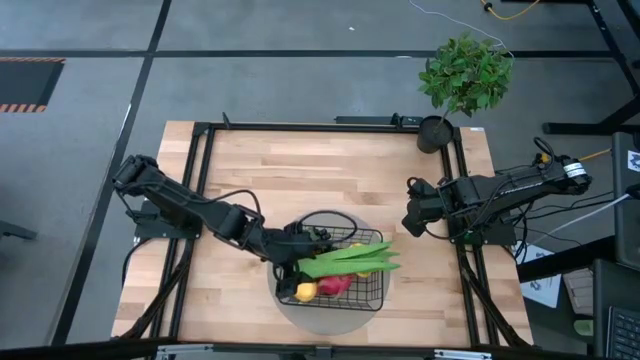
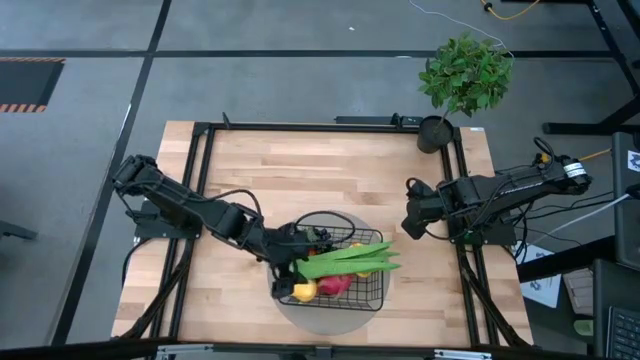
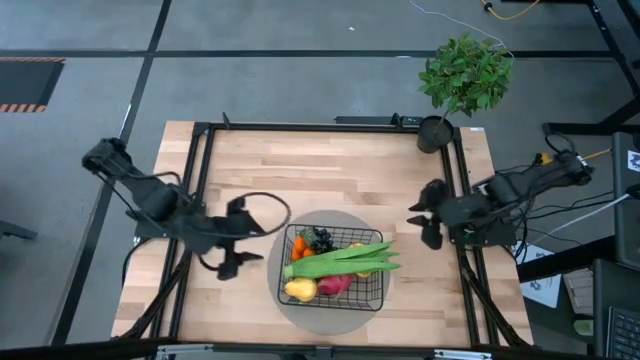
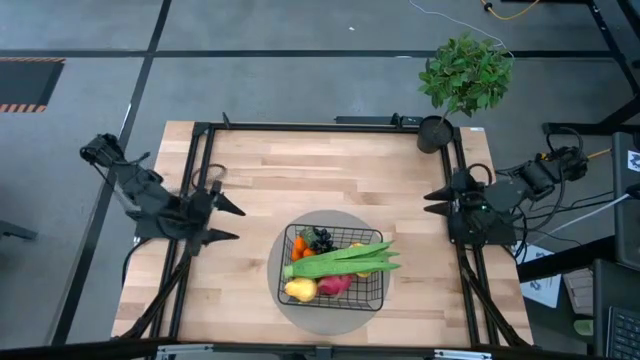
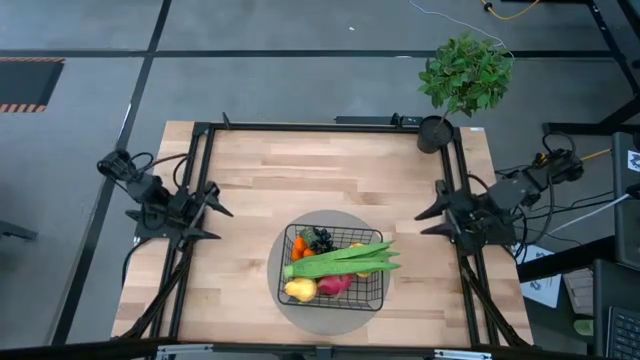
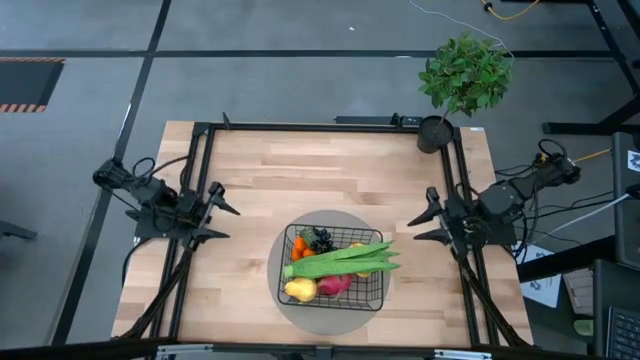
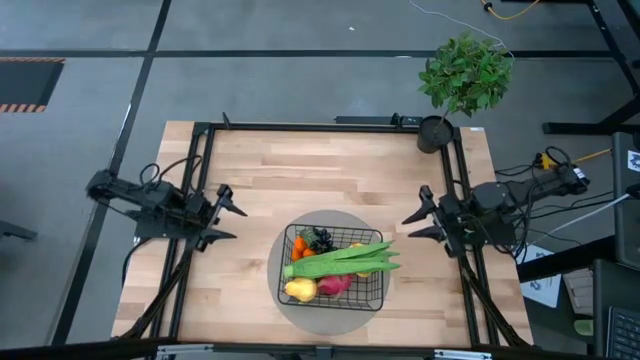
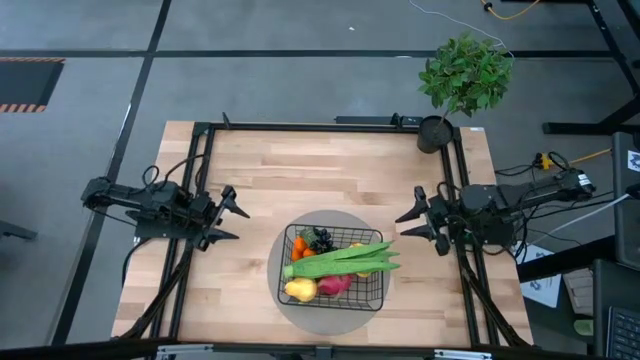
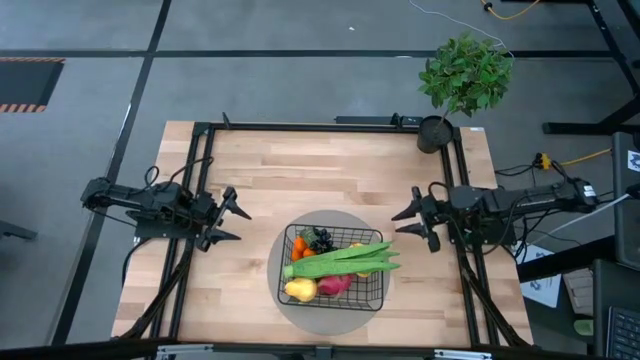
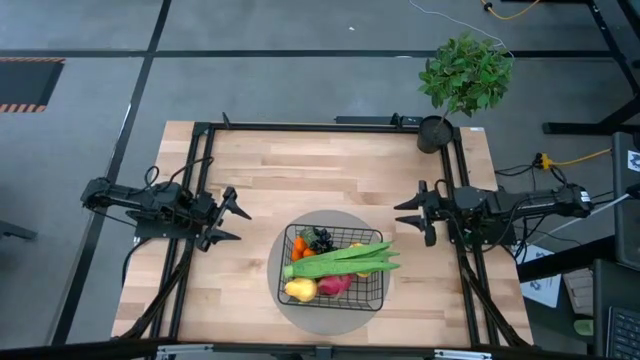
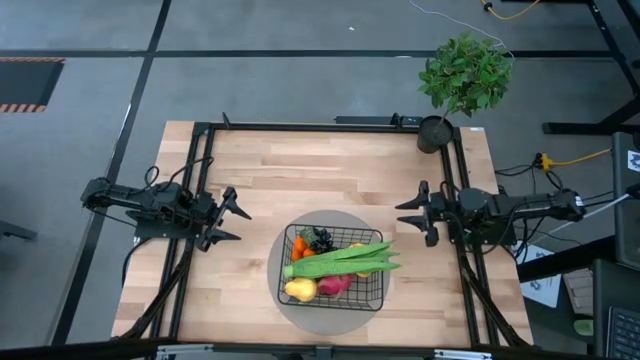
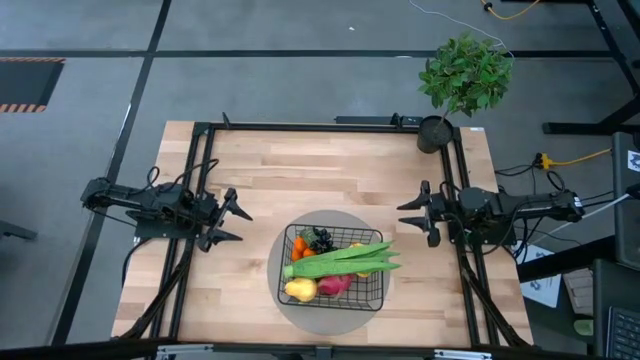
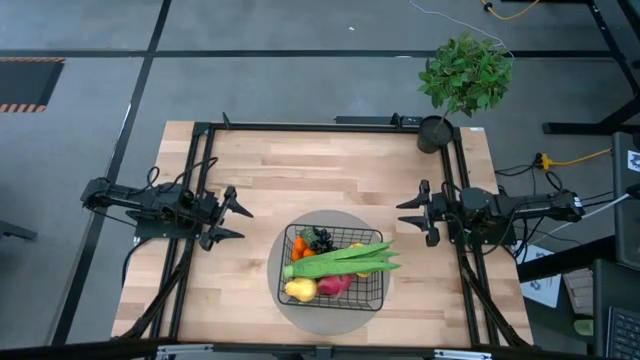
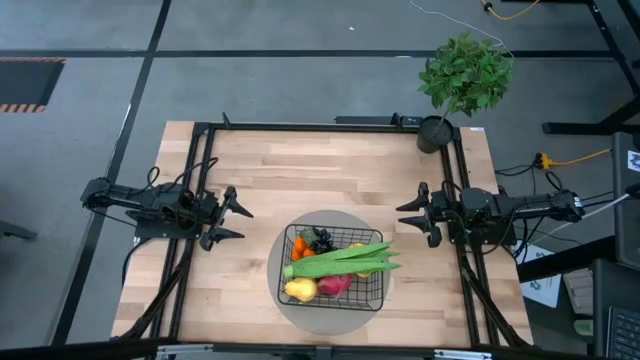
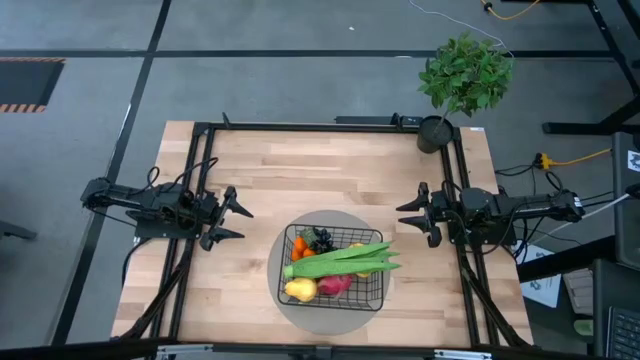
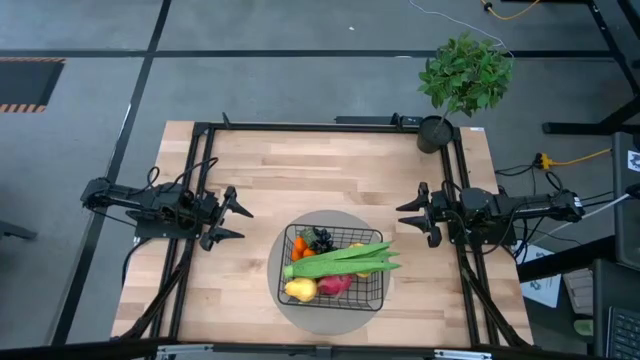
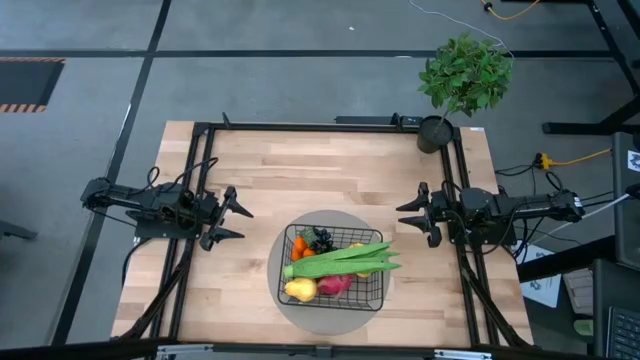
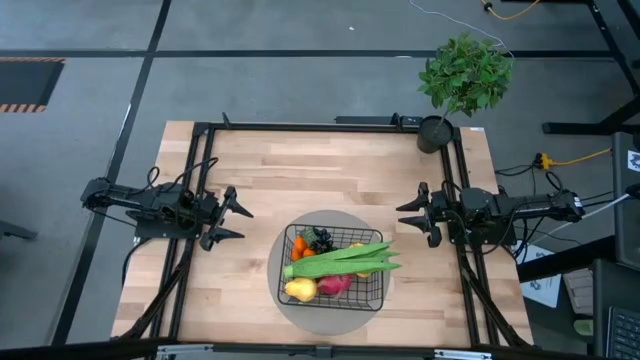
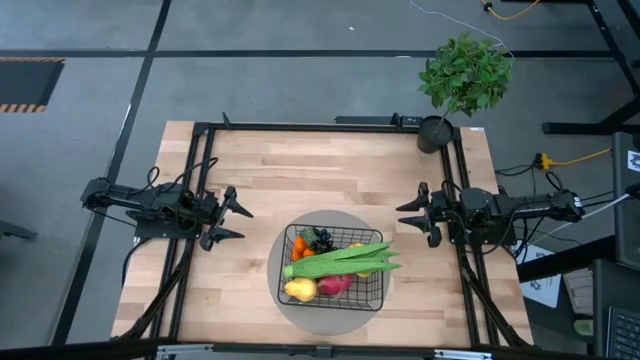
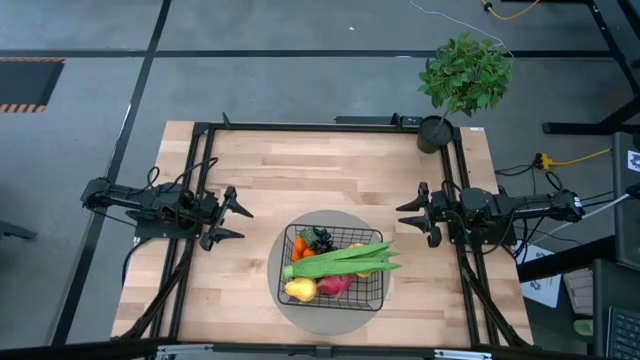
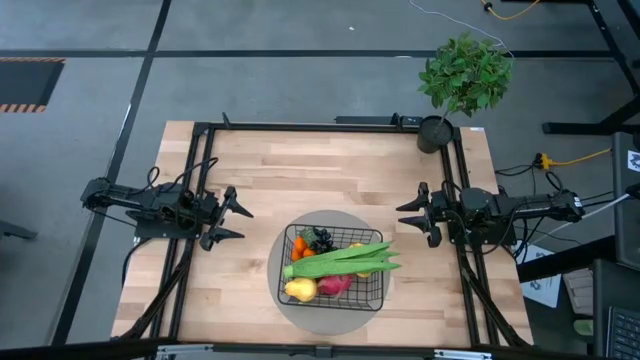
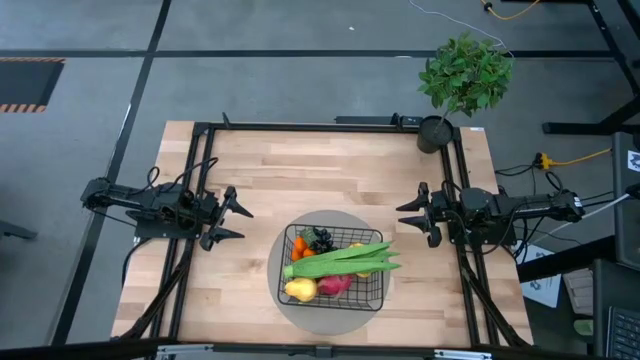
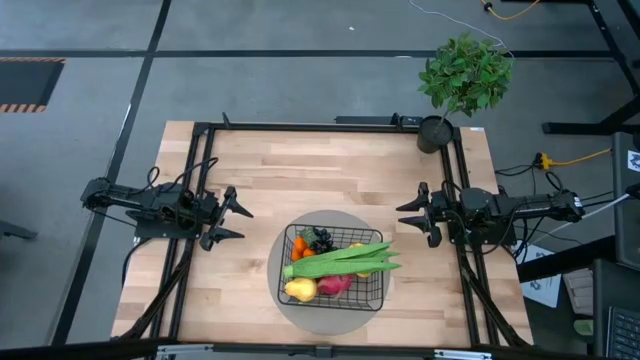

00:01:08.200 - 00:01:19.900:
Task: Build produce basket
Return to home position

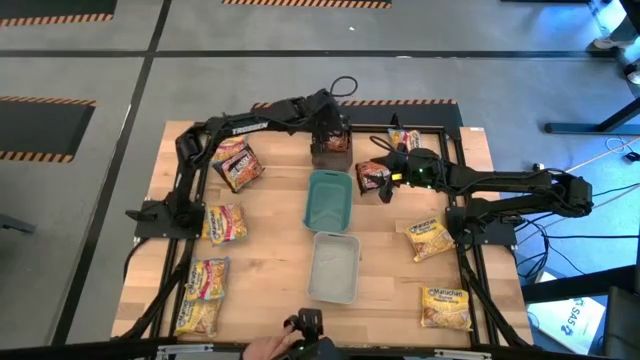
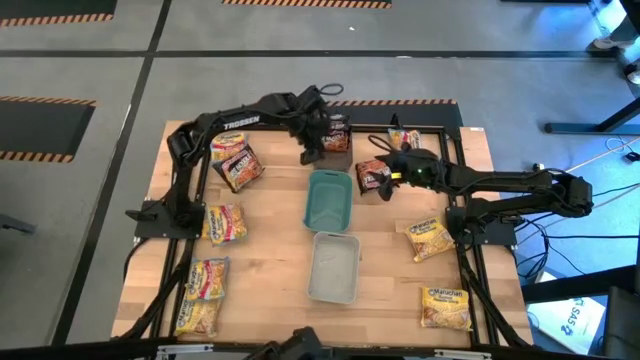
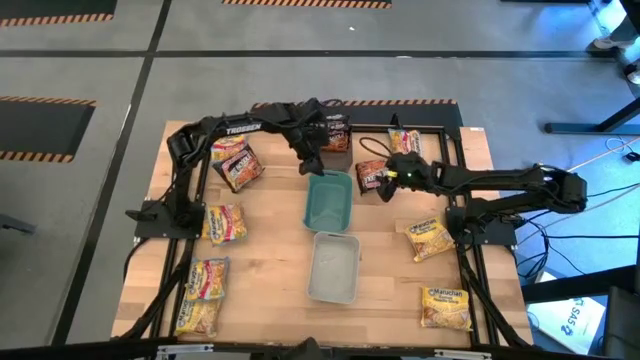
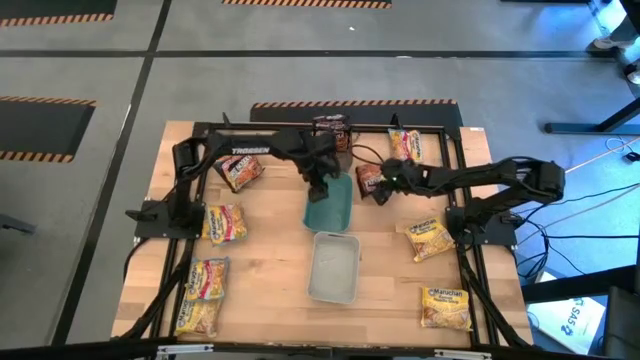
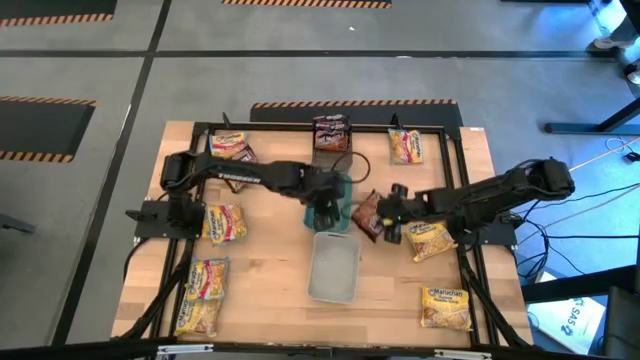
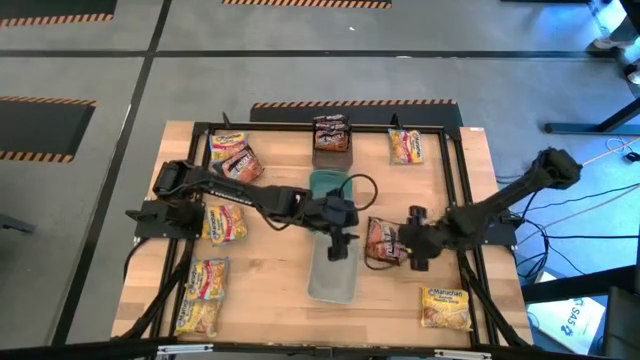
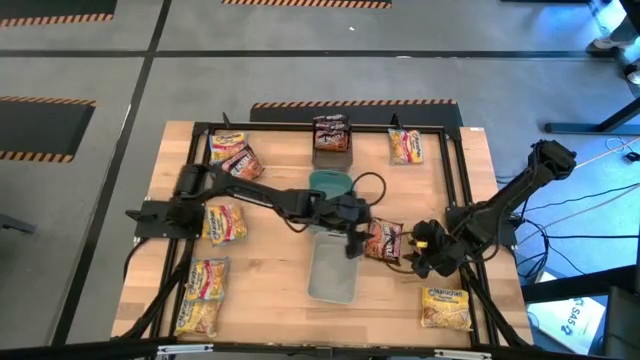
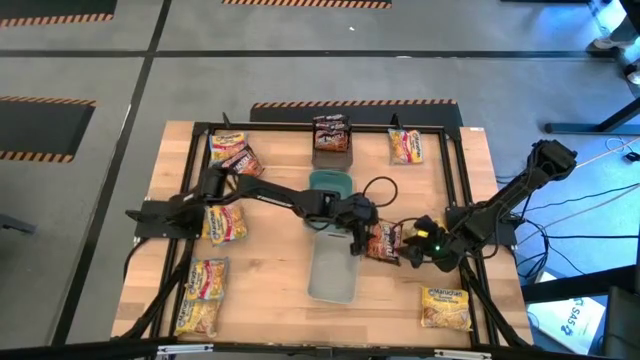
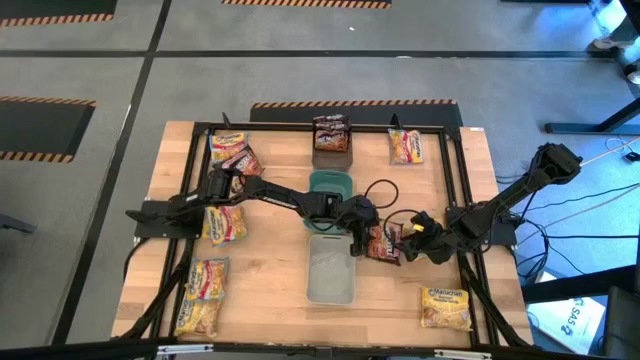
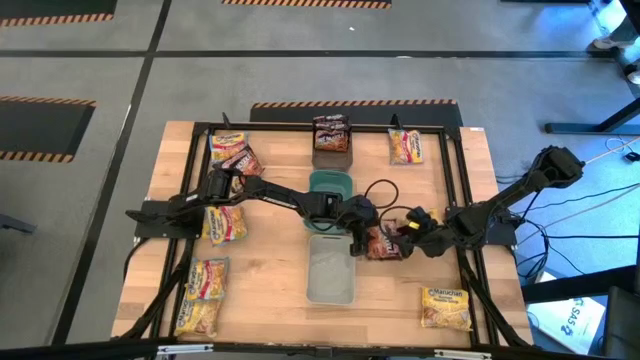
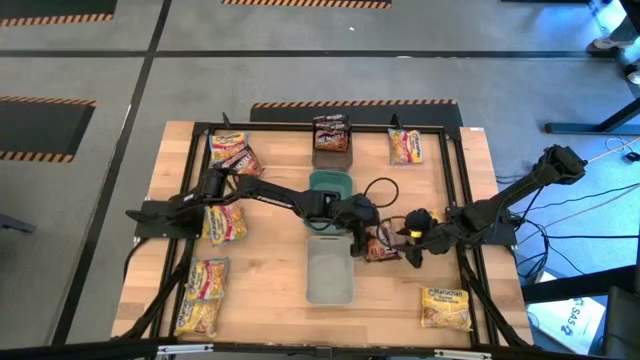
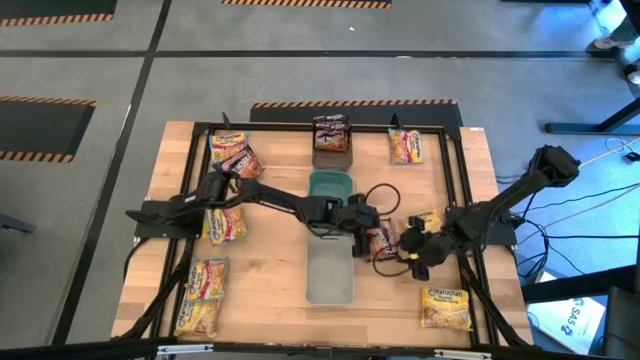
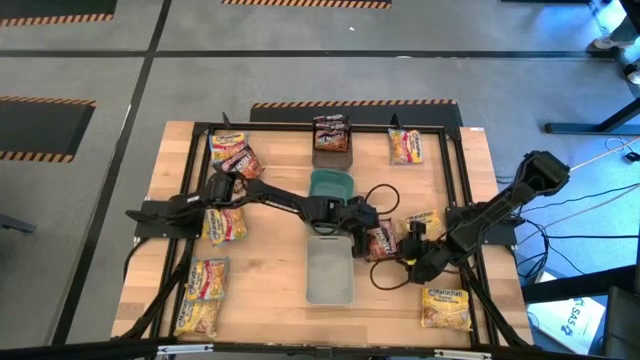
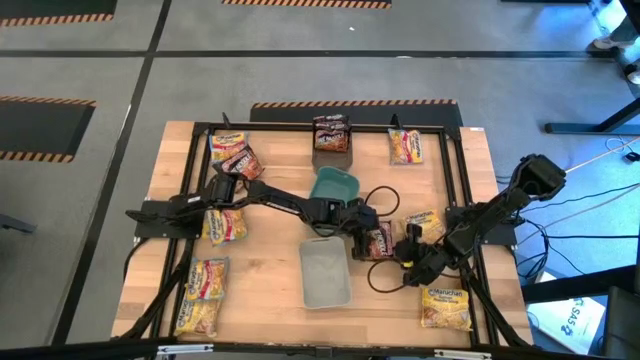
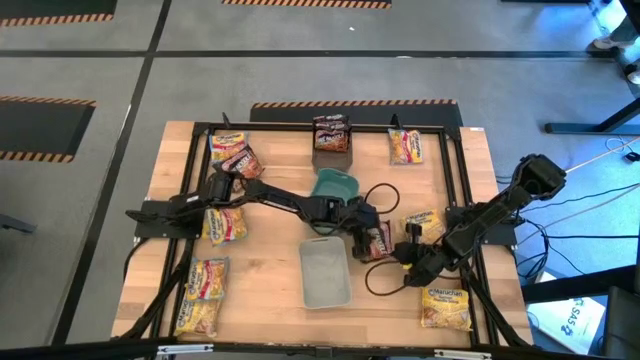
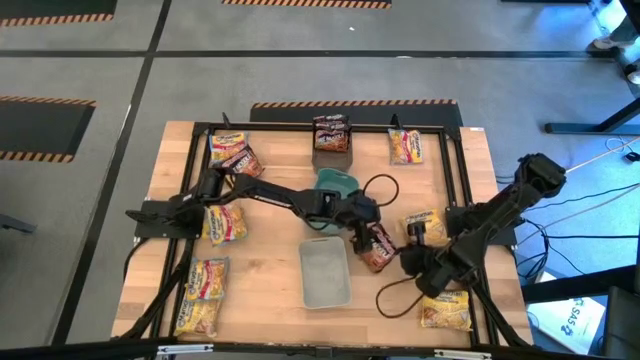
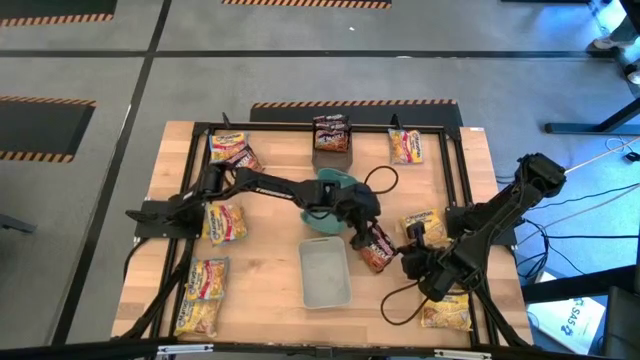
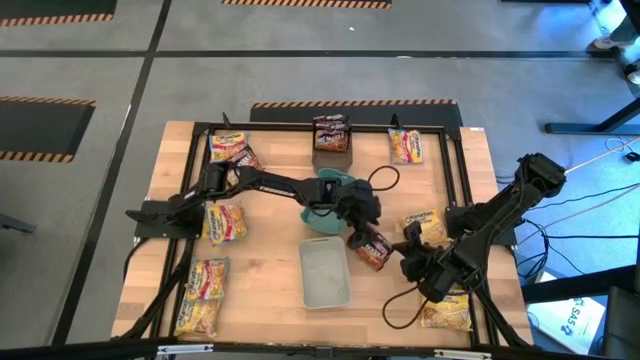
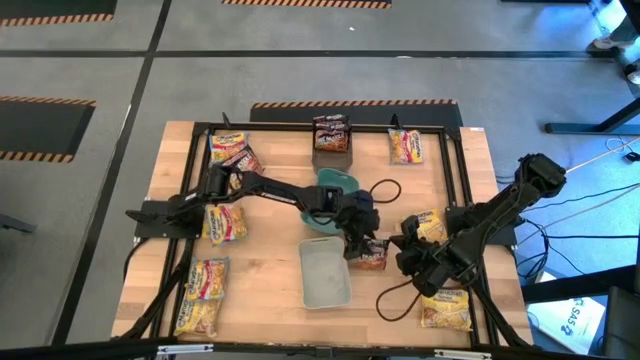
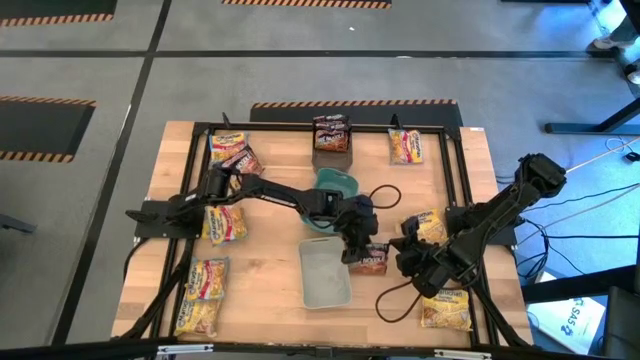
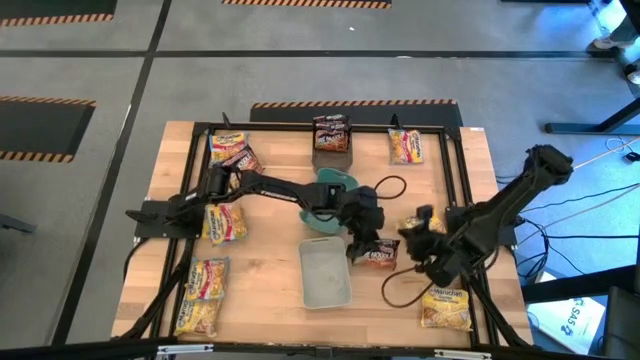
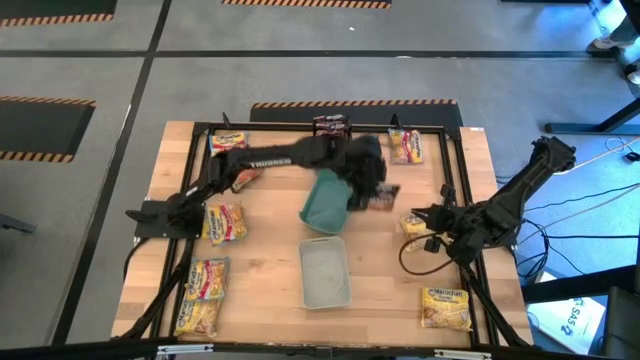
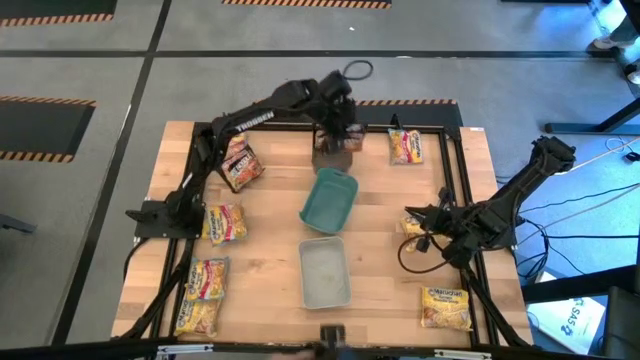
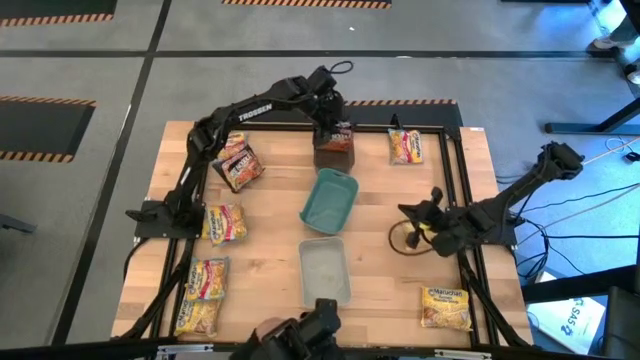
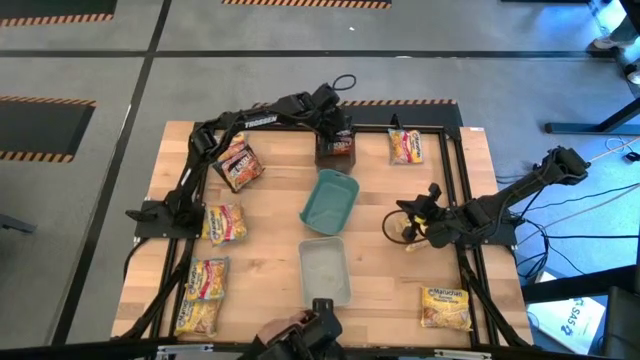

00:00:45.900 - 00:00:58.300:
Task: Sort Maruchan noodles
Put the black noodle pack into the black bin
